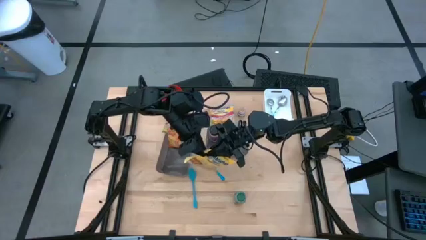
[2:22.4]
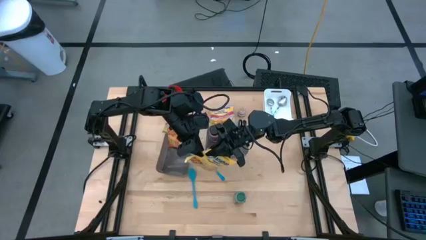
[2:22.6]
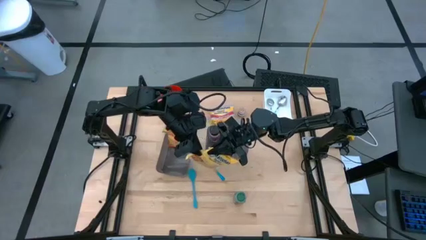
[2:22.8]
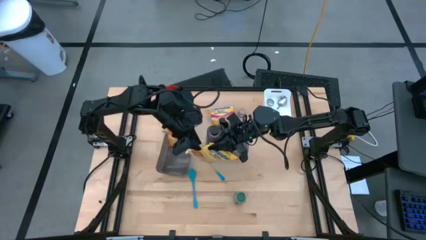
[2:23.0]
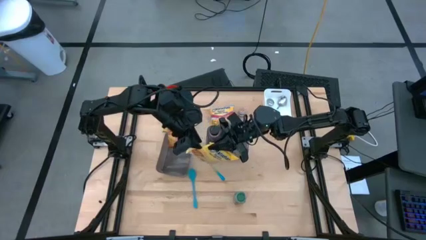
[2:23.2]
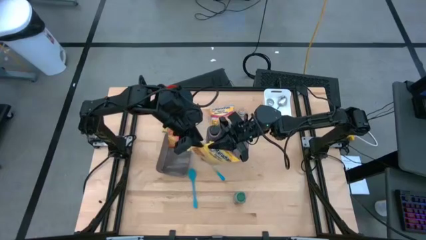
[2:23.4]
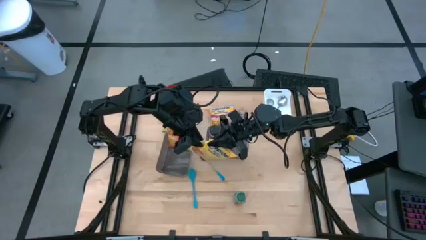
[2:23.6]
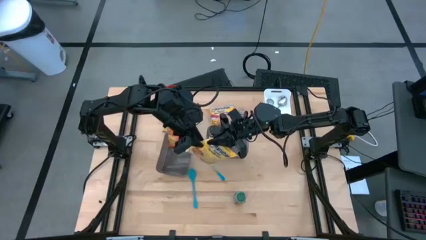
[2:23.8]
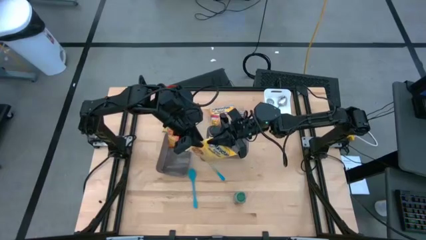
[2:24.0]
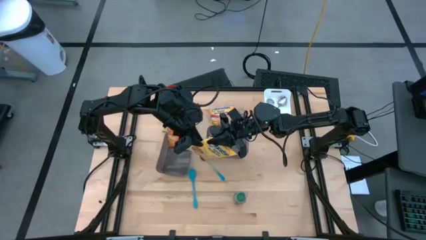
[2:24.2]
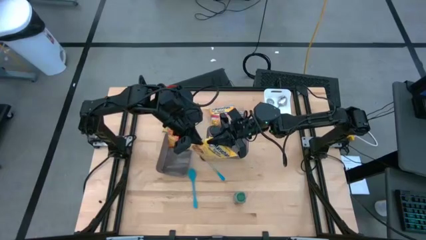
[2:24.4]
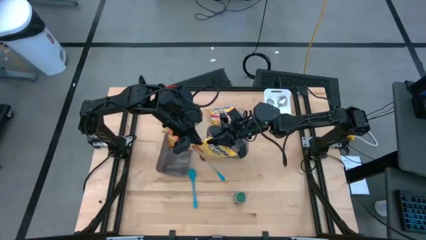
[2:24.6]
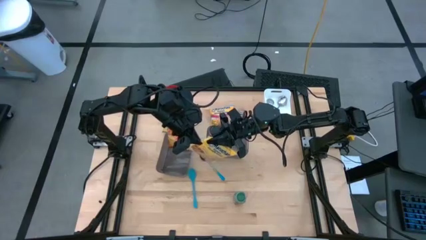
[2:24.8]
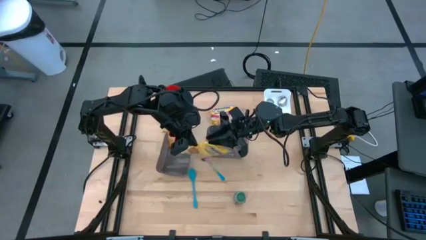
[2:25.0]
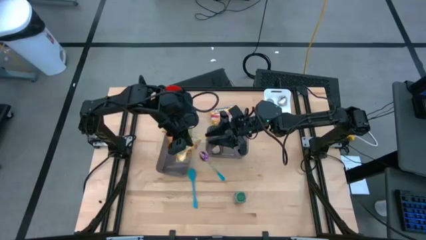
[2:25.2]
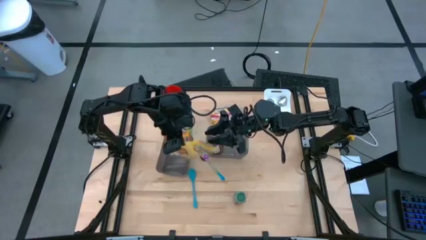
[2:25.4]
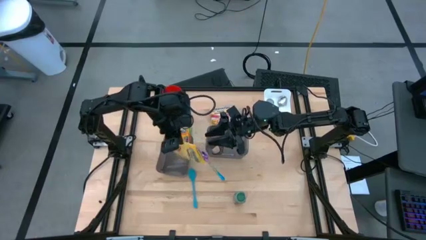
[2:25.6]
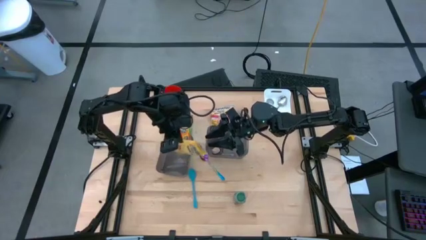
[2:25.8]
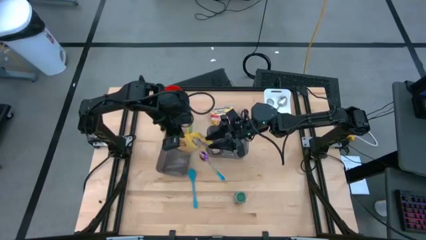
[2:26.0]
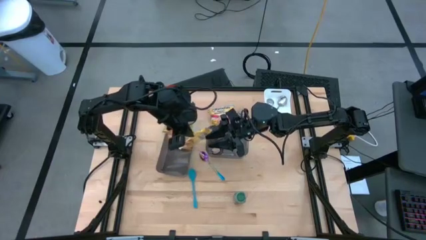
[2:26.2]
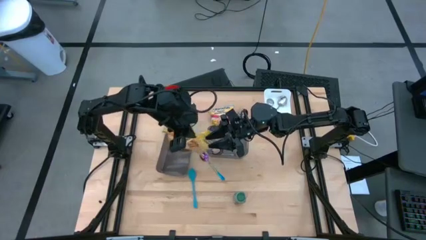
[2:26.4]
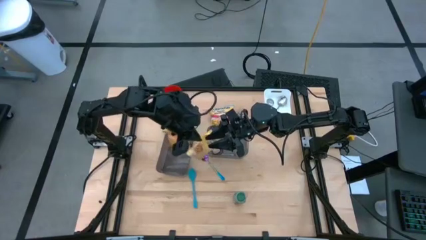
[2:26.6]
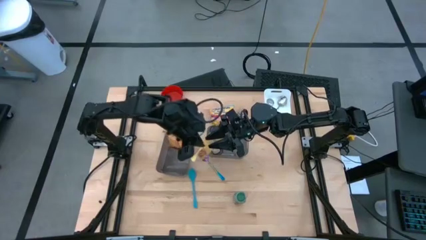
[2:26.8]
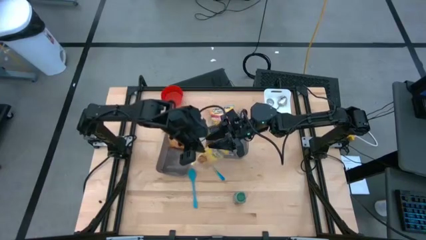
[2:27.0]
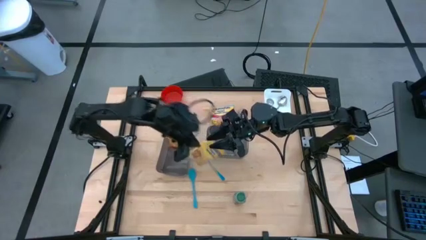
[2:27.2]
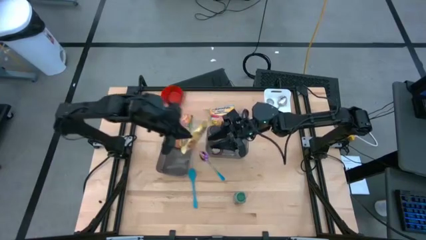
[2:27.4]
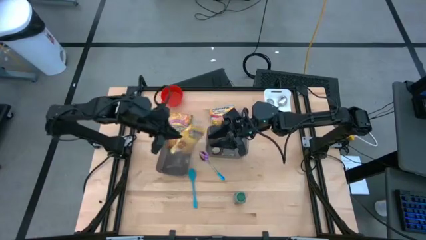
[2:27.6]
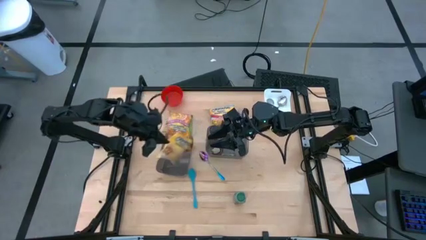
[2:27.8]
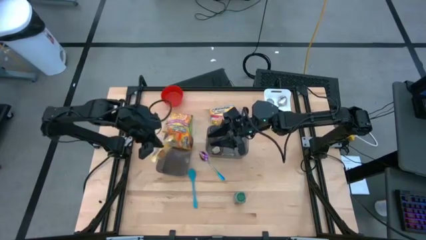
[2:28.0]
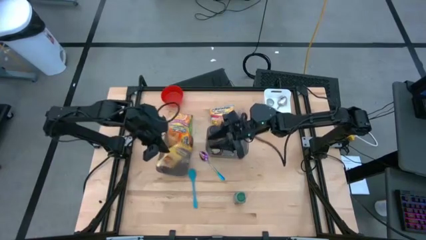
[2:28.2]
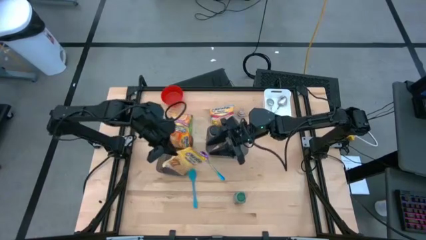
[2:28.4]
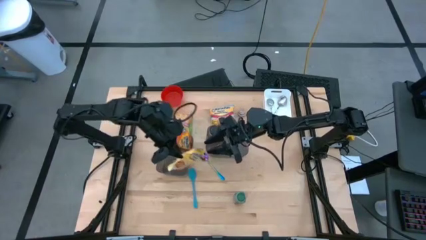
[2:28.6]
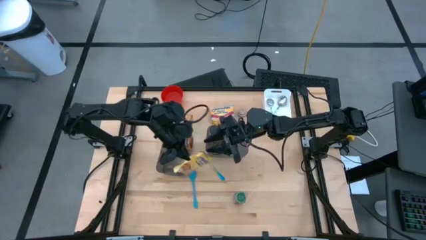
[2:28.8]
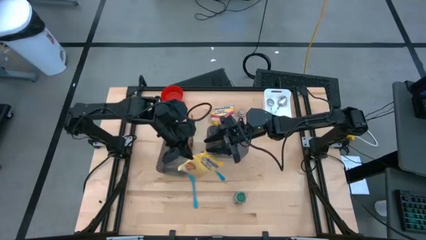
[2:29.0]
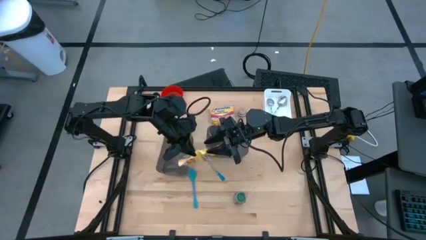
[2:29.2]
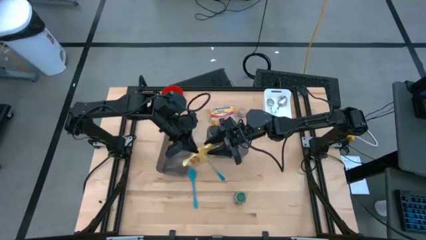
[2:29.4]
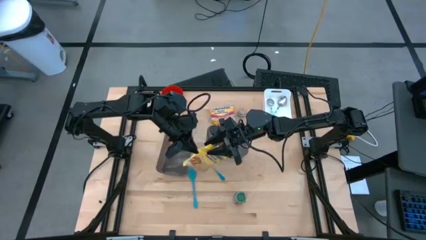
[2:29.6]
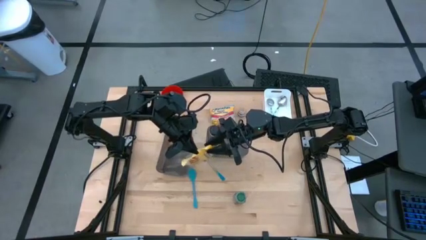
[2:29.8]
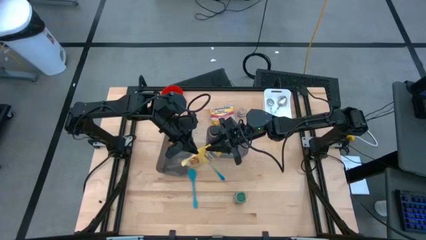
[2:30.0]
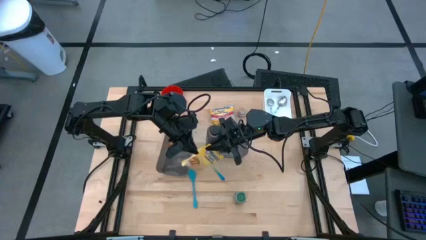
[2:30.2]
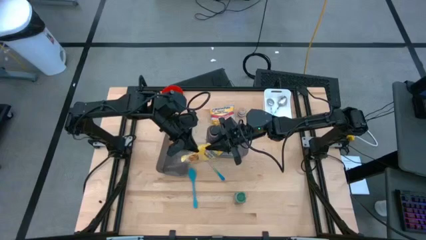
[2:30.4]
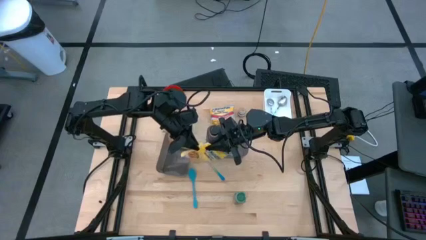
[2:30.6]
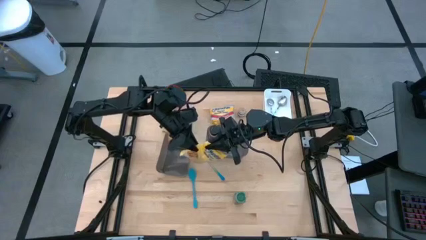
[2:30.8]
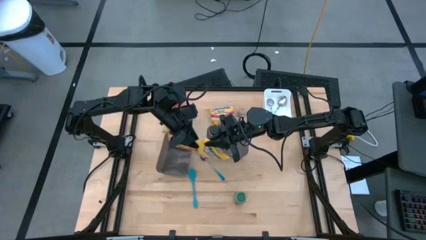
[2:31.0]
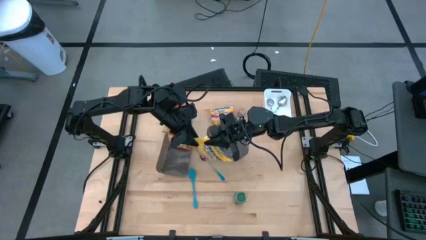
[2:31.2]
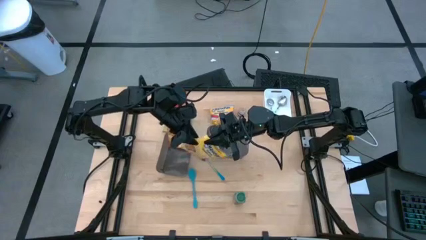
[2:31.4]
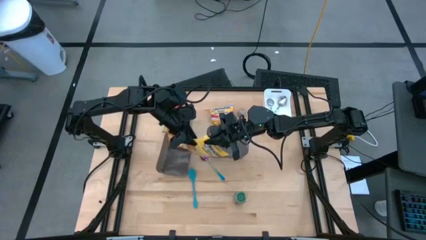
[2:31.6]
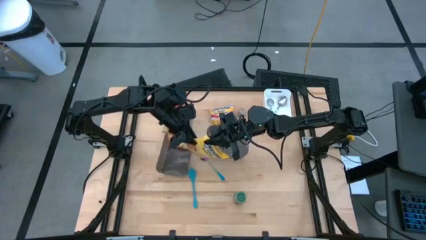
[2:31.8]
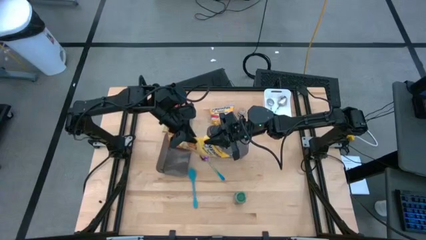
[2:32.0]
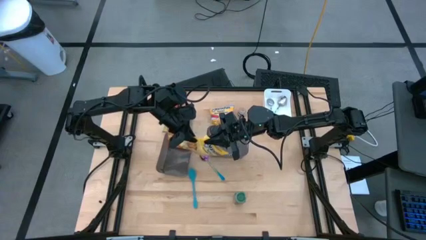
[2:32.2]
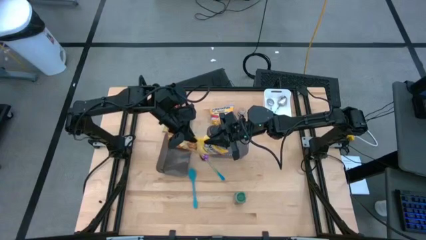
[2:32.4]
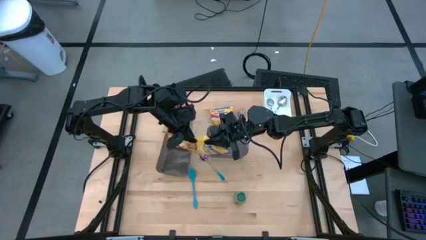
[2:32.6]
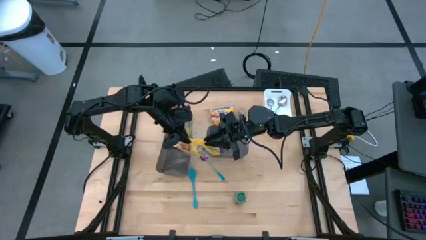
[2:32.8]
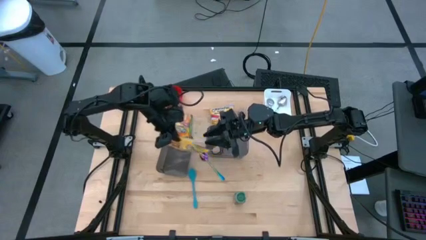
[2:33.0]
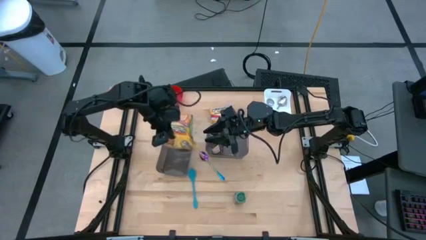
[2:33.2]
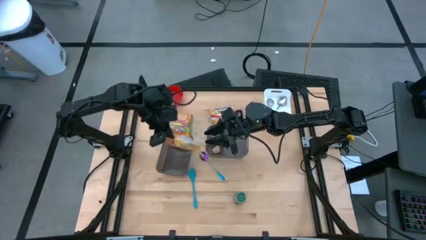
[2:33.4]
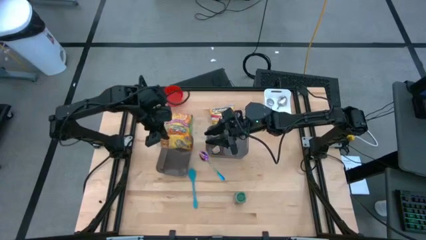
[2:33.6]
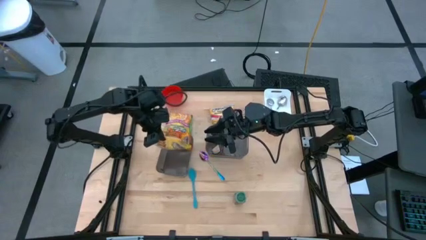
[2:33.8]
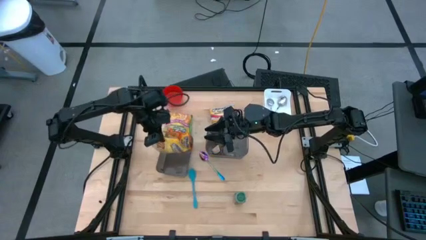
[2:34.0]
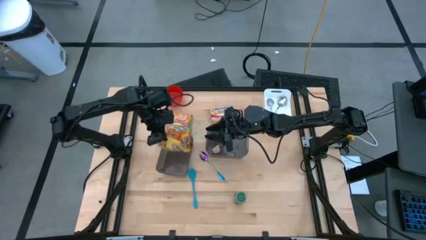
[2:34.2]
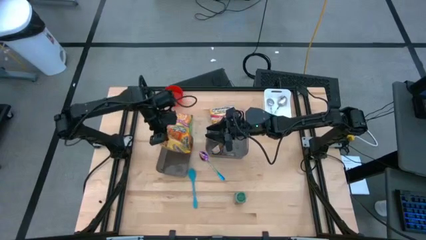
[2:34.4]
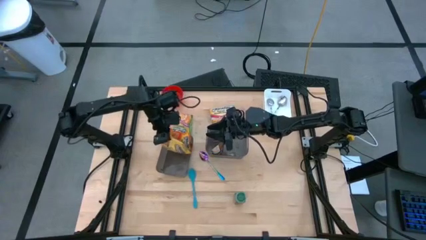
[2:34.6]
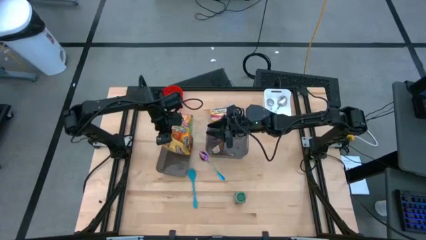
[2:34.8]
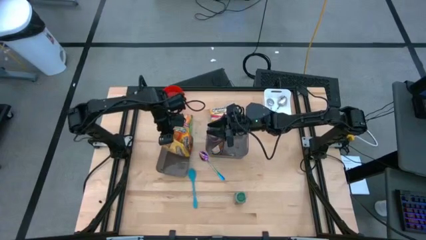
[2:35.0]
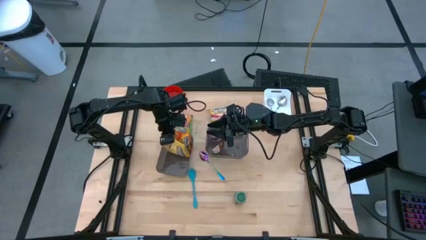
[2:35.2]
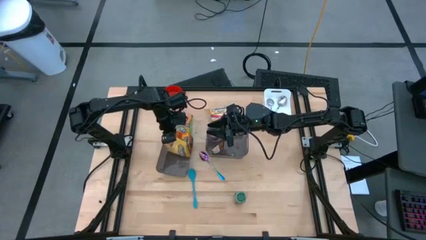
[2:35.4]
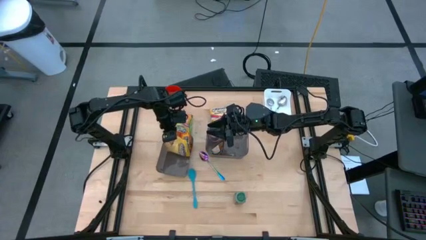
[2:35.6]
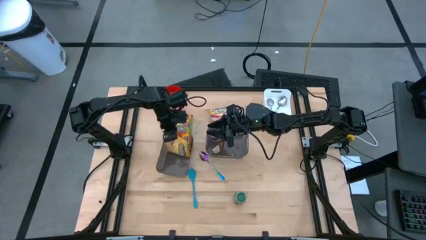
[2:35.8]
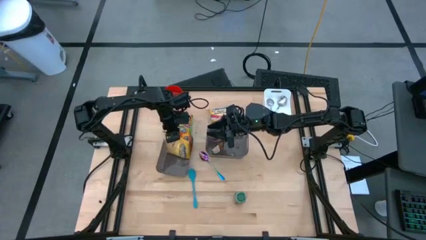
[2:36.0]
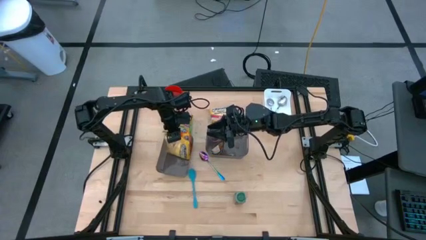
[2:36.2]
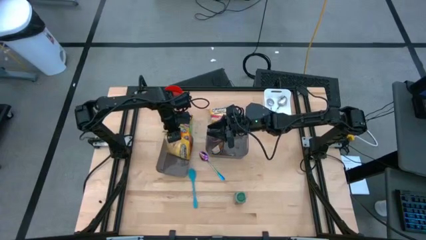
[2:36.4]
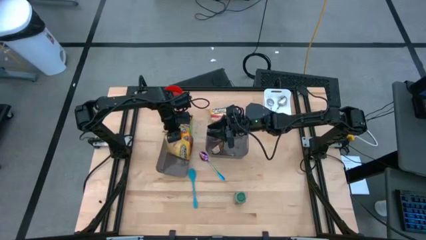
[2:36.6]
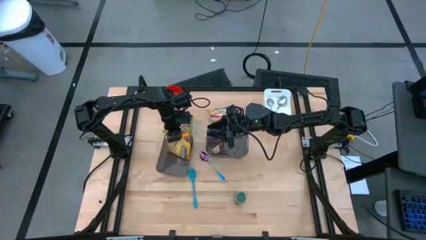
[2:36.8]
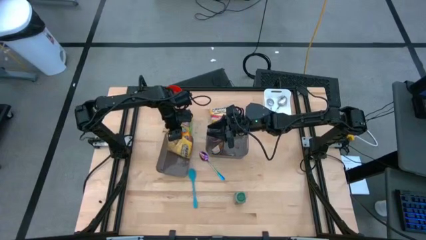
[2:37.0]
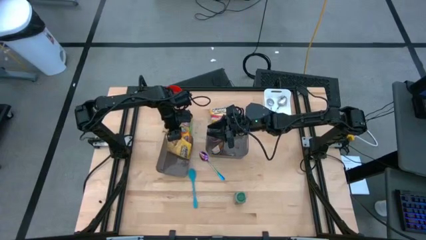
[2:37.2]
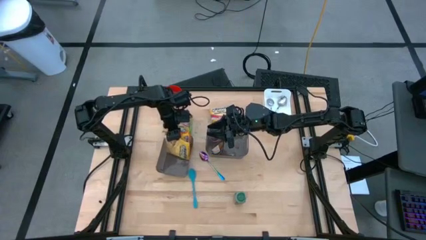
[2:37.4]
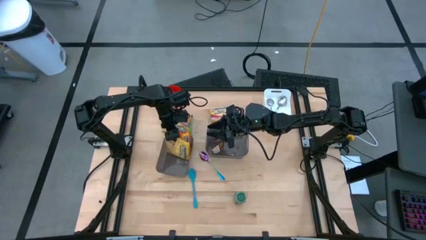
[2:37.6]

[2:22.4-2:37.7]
Task: Pick & Place Food Item
Put the yellow noodle pack into the left black bin
